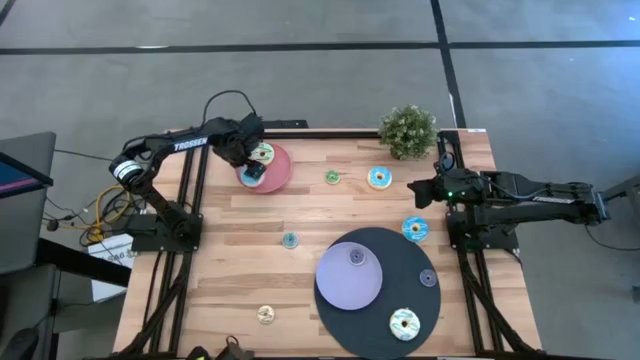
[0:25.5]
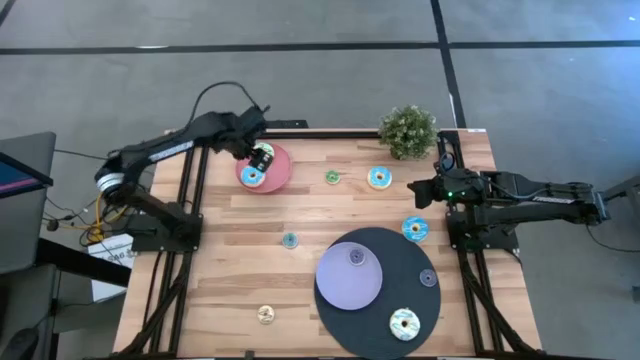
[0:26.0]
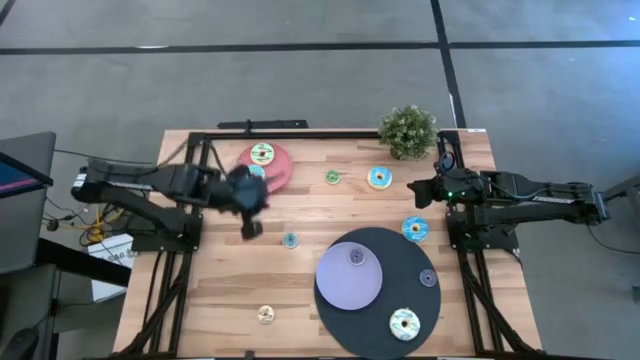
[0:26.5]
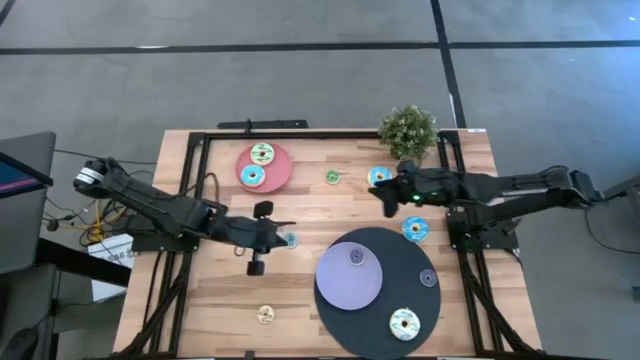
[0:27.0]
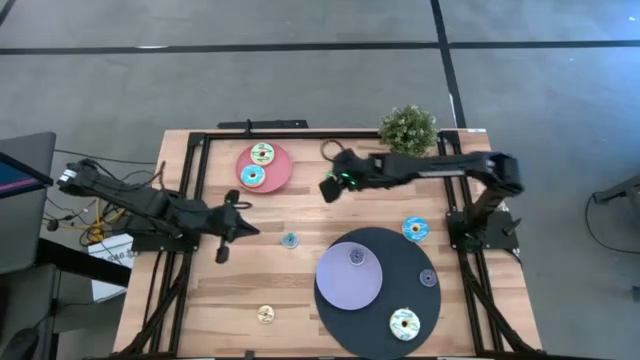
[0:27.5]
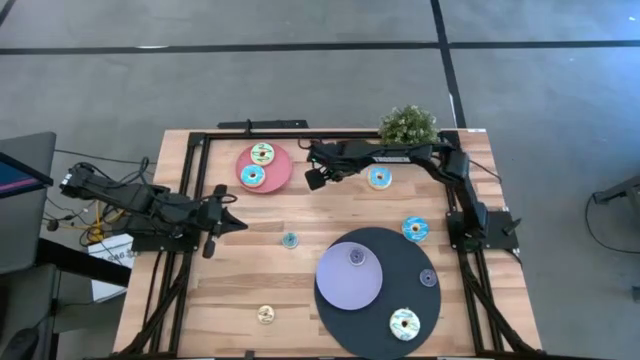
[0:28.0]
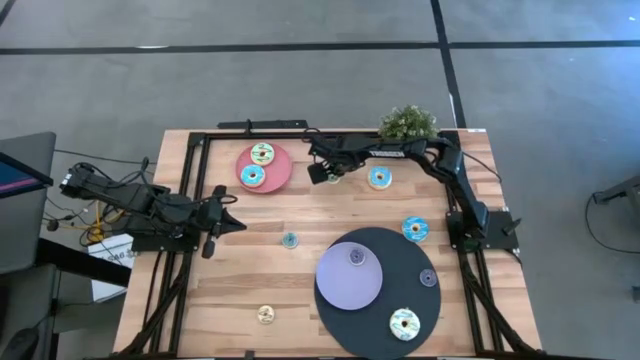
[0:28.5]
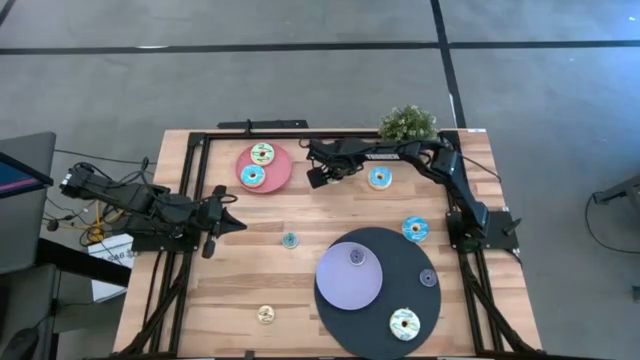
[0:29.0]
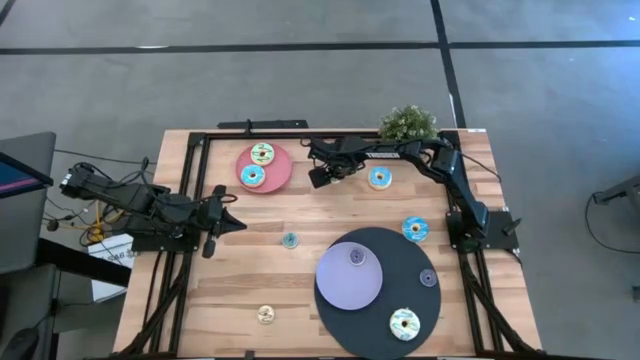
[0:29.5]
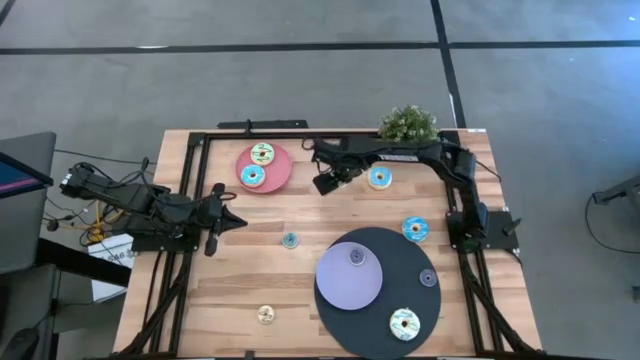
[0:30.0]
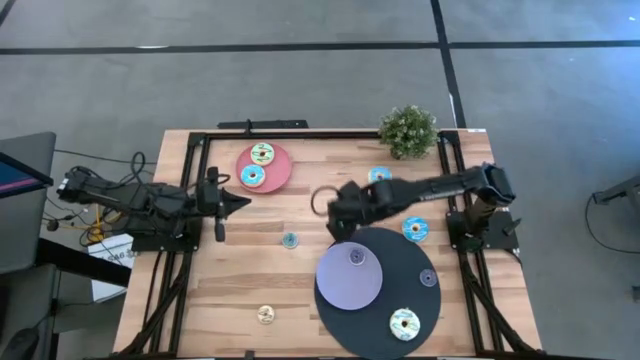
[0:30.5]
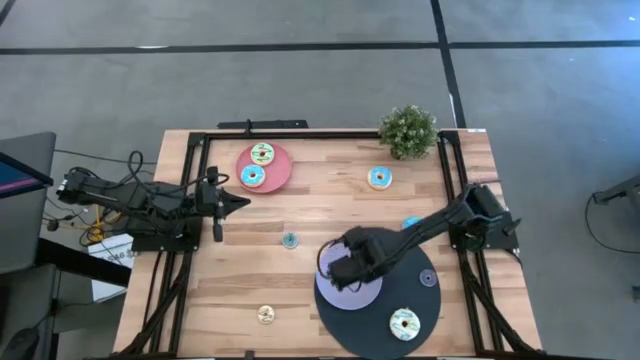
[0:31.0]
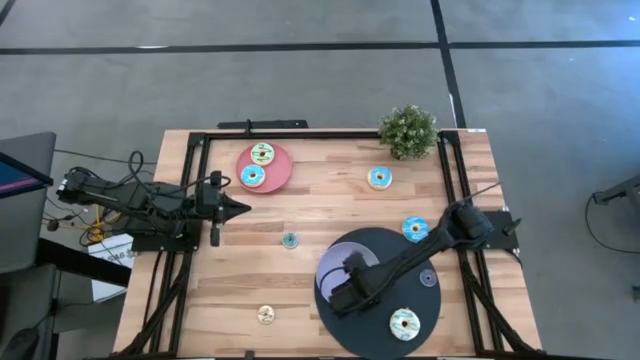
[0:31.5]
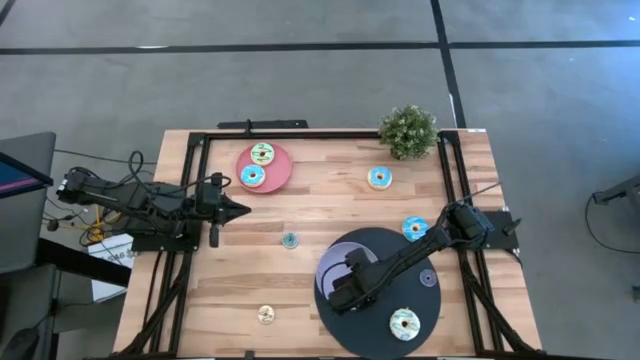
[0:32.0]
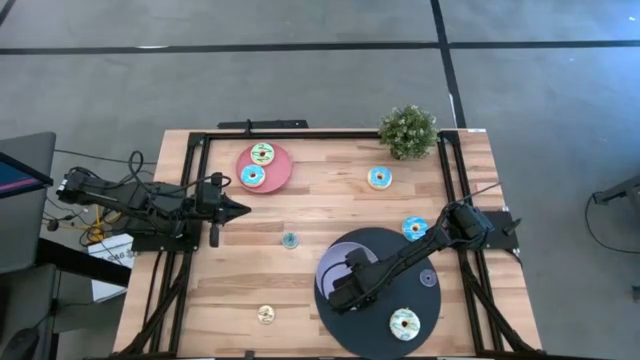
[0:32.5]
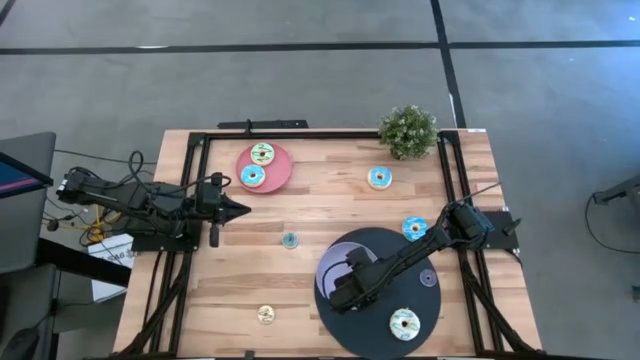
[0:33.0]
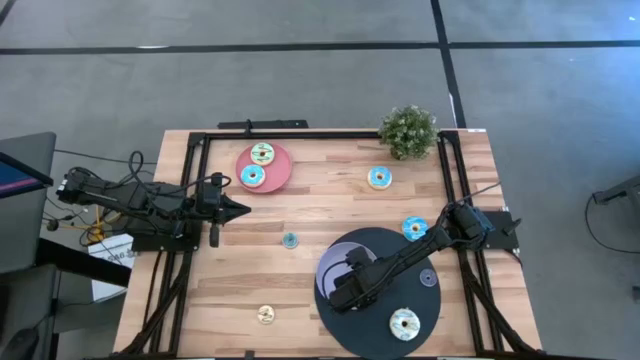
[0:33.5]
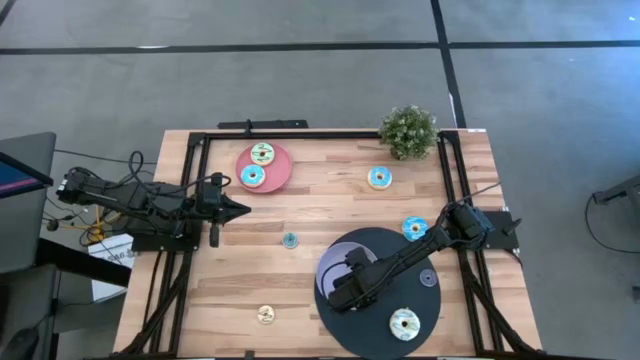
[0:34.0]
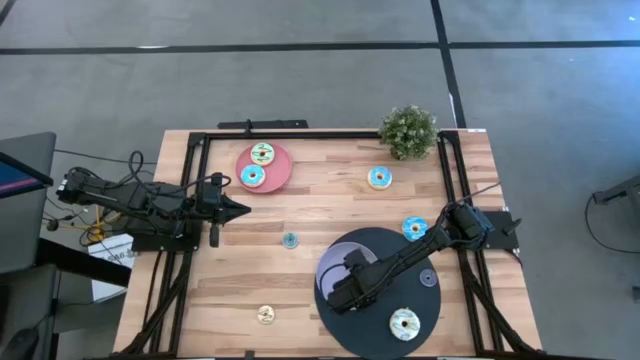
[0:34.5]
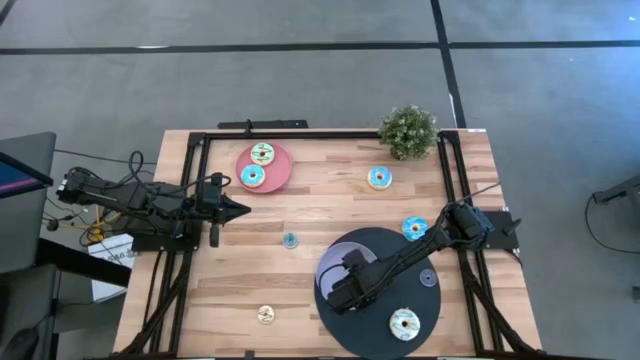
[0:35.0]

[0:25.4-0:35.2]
Task: Pick & Place donuts
Put the small green donut on the purple plate

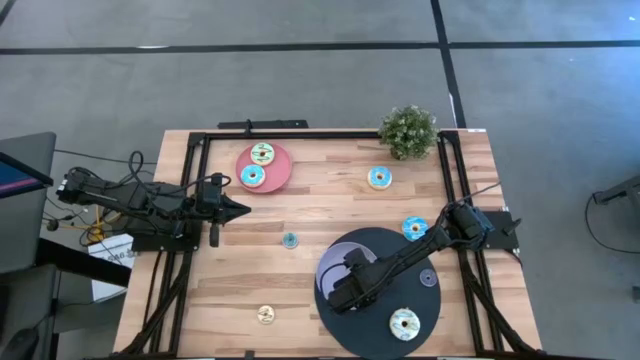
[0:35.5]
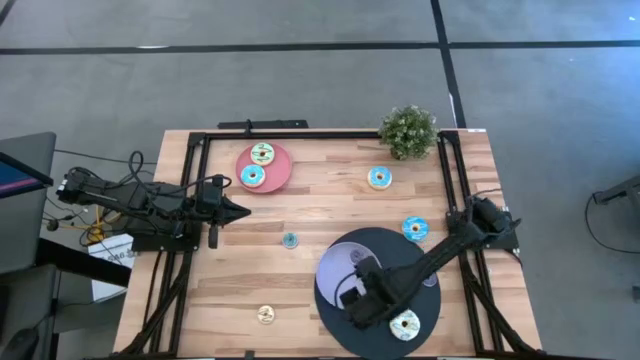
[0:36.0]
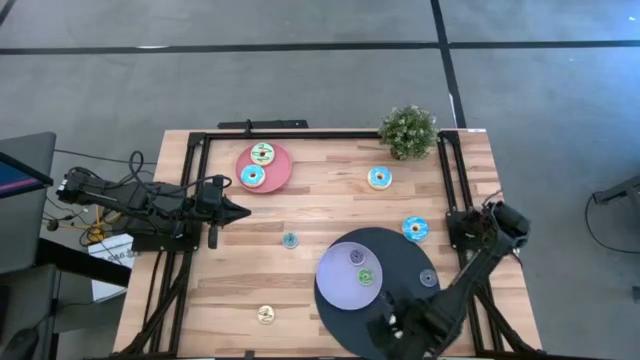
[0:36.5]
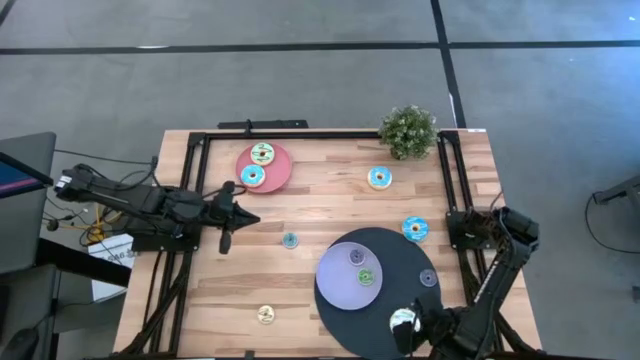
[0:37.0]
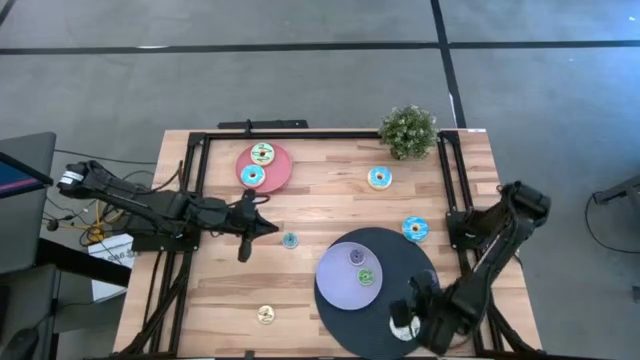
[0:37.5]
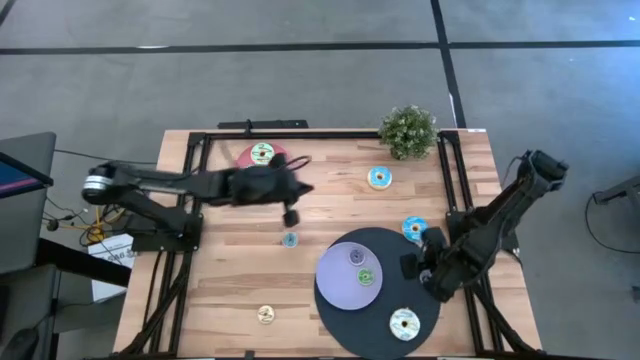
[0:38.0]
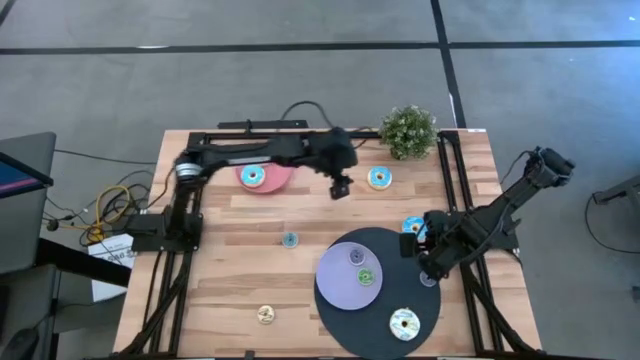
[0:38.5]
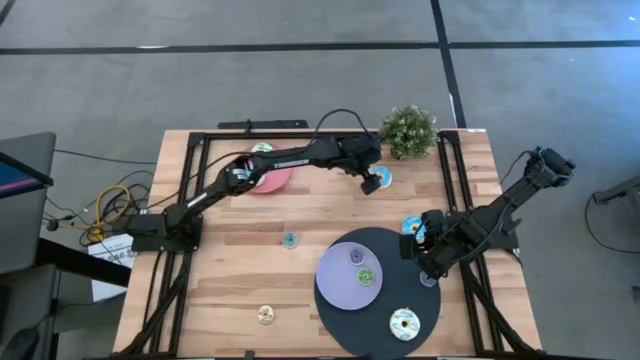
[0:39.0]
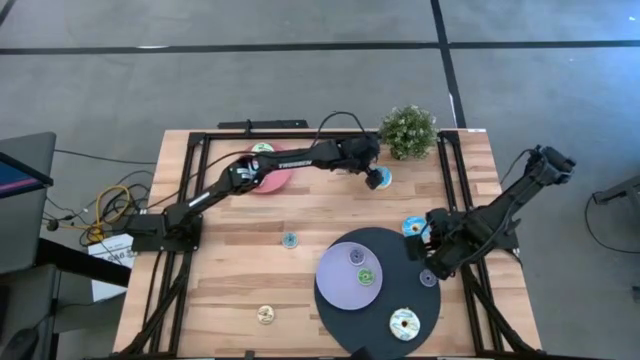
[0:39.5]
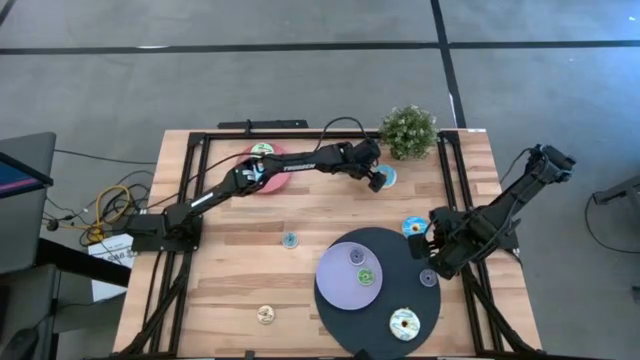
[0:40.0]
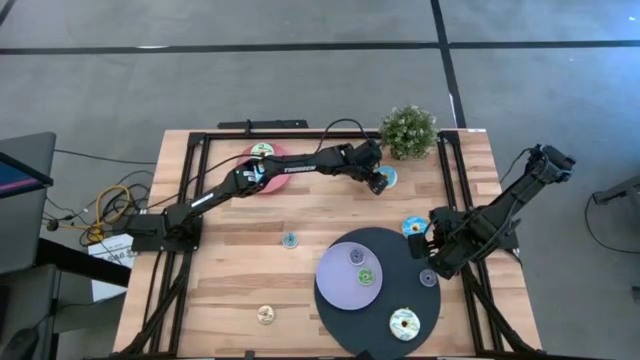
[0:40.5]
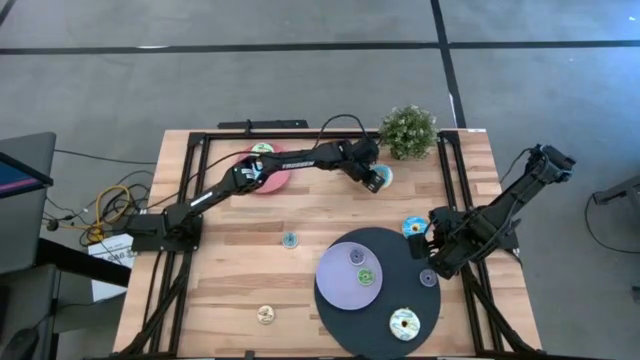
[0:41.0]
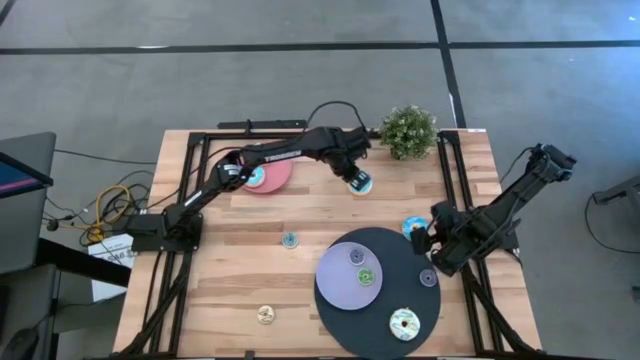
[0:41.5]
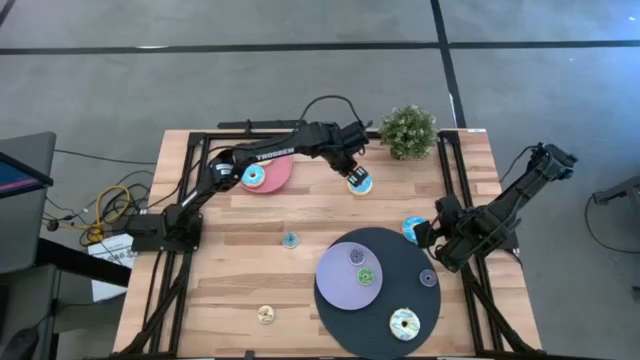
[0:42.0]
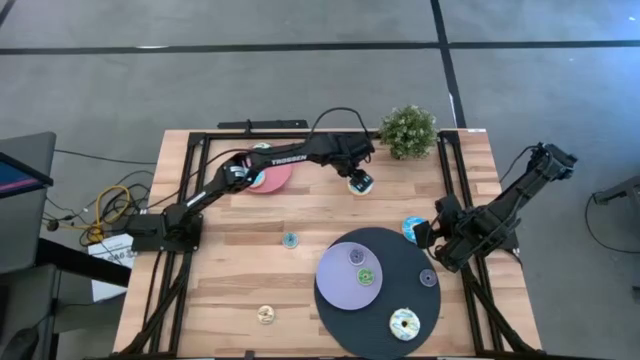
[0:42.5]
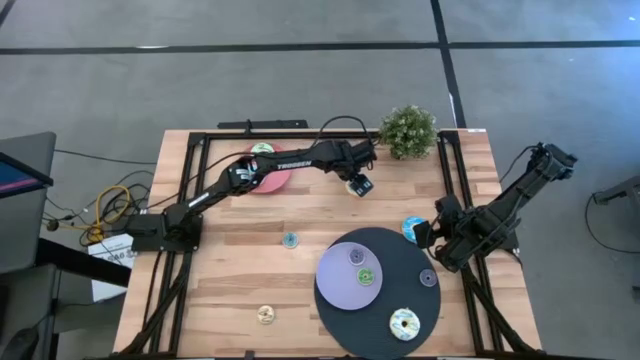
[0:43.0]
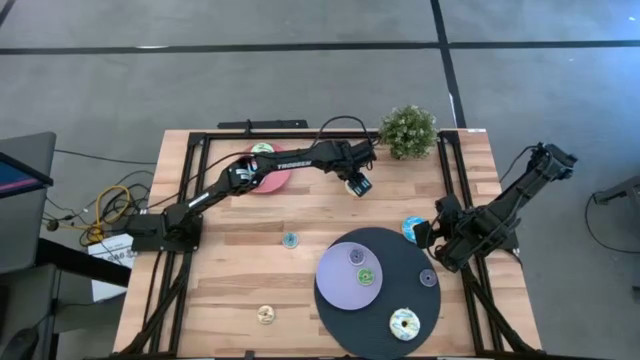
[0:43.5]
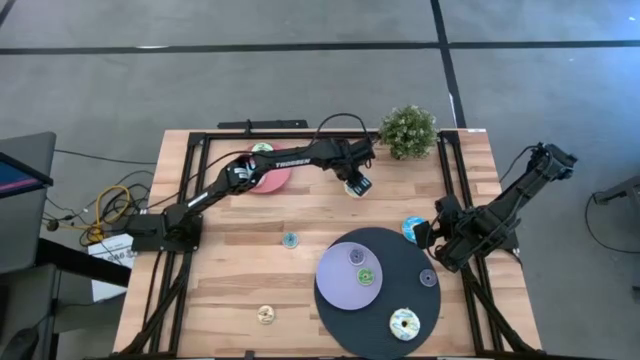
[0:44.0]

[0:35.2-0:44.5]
Put the top large blue donut on the pink plate

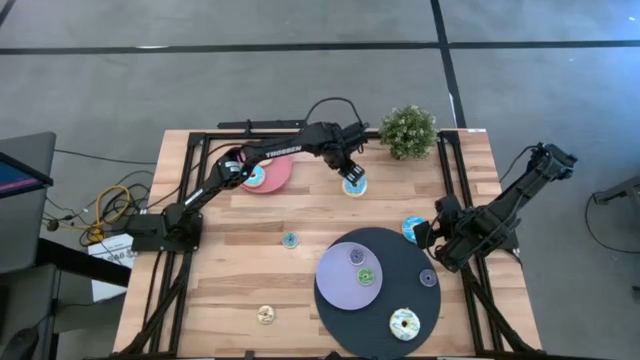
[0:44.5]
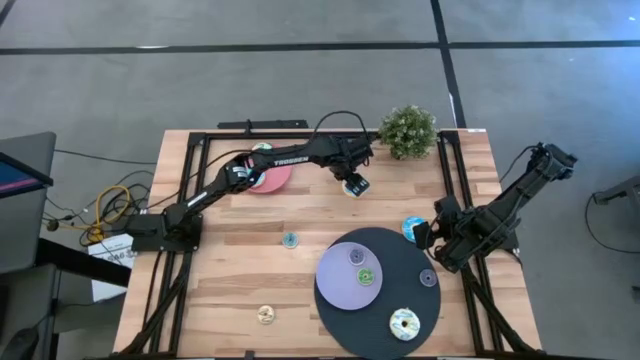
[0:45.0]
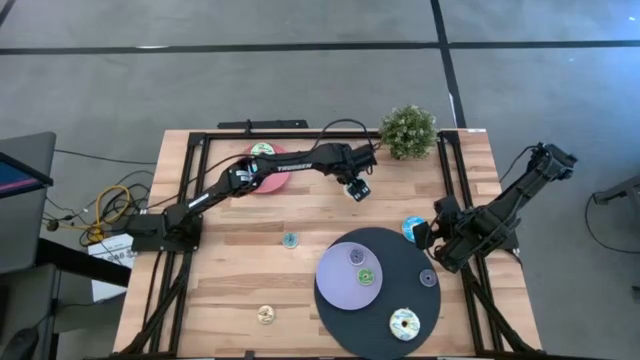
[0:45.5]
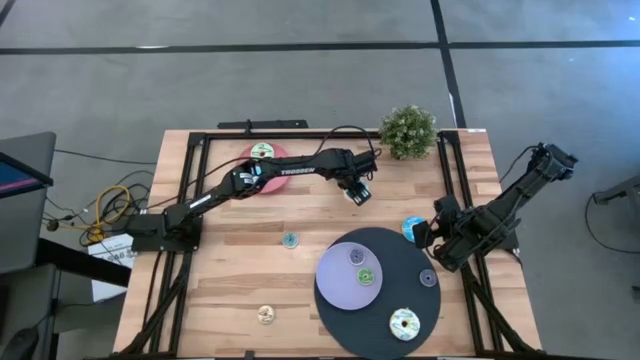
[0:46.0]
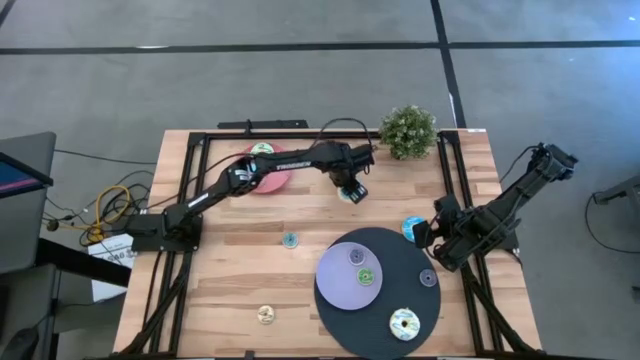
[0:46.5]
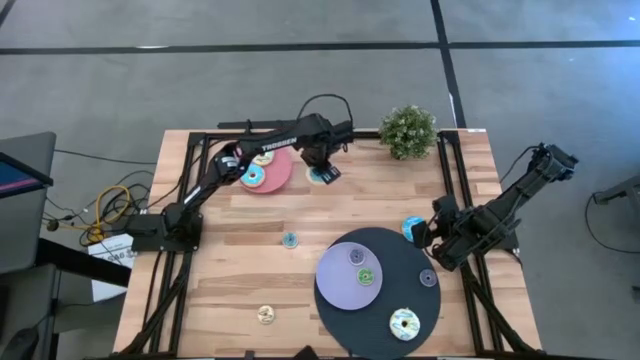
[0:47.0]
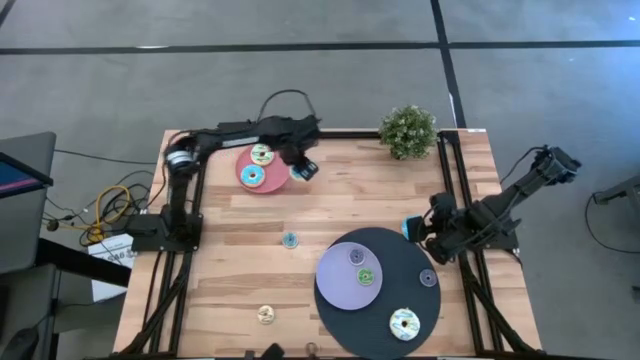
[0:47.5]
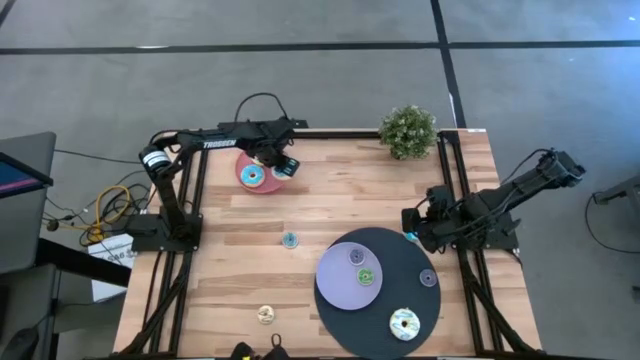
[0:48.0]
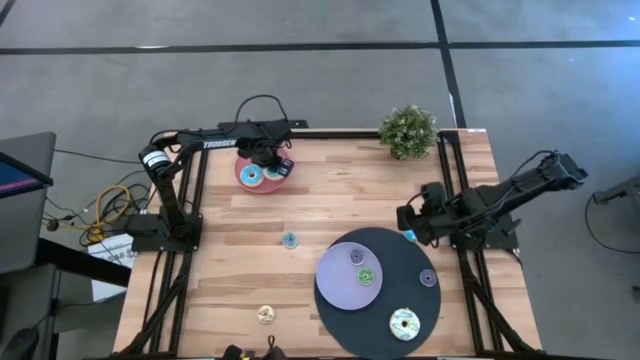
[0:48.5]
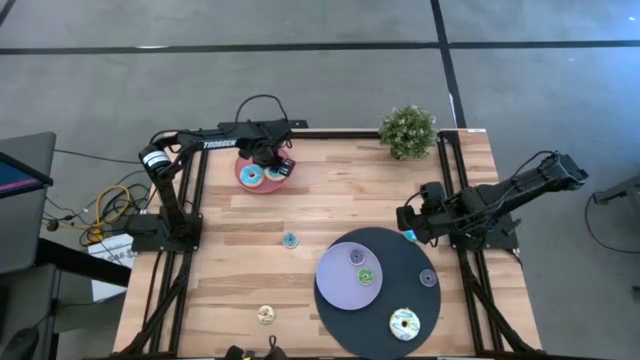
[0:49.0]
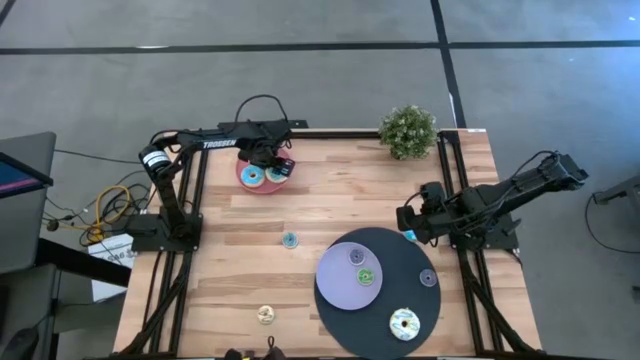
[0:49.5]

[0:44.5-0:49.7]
Put the top large blue donut on the pink plate
